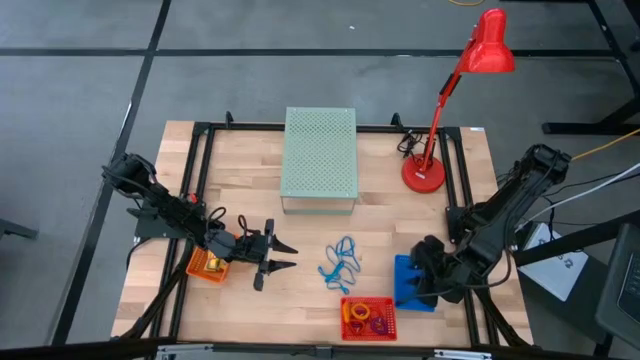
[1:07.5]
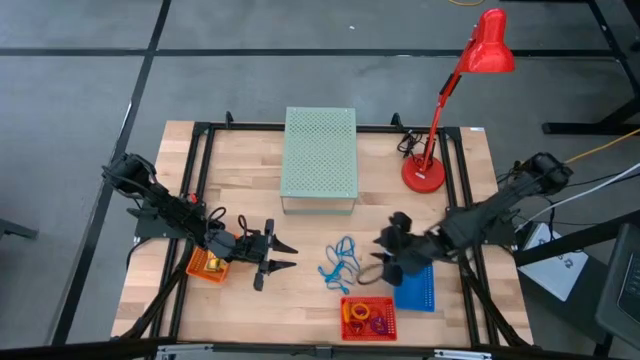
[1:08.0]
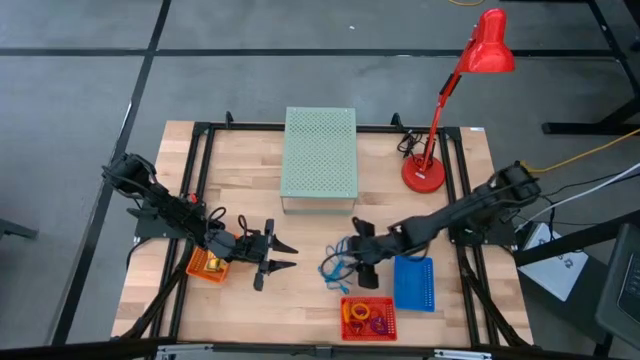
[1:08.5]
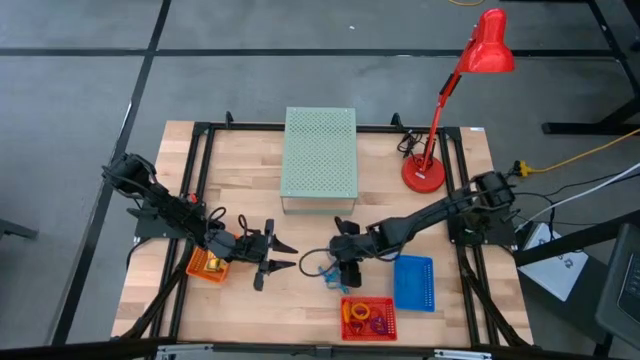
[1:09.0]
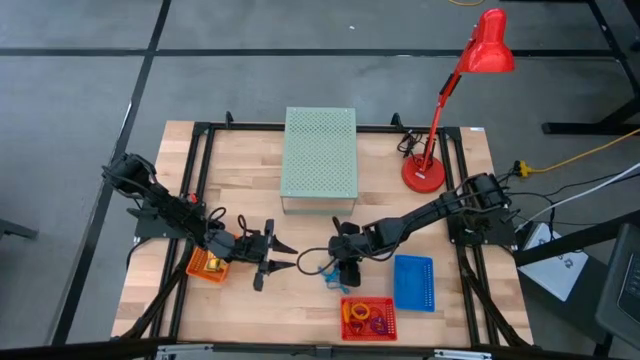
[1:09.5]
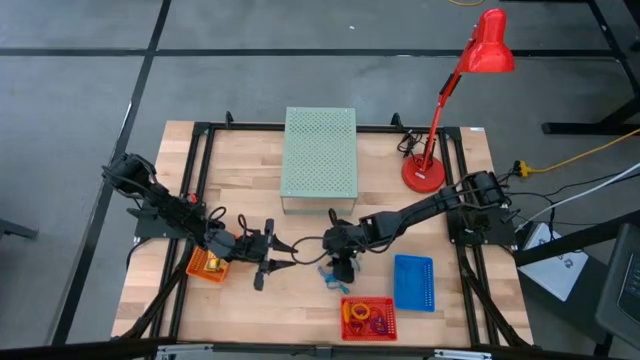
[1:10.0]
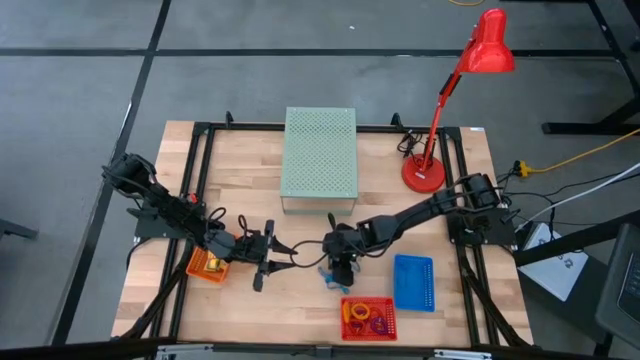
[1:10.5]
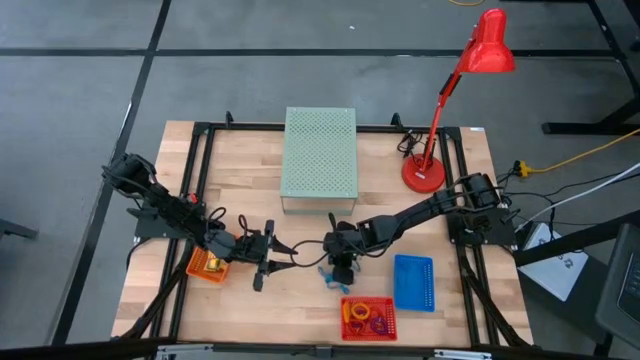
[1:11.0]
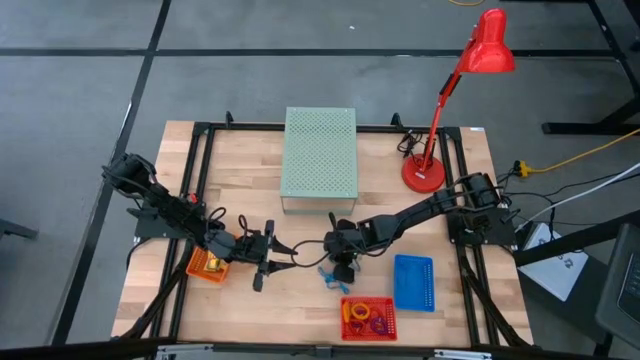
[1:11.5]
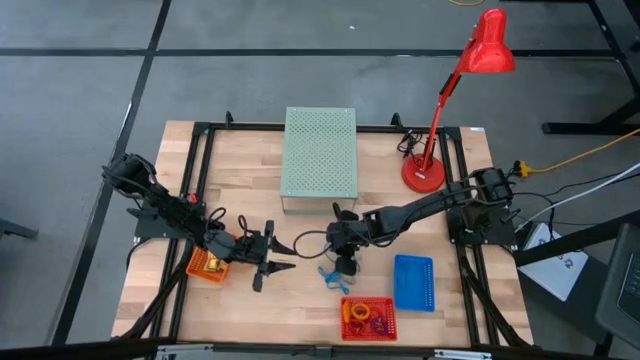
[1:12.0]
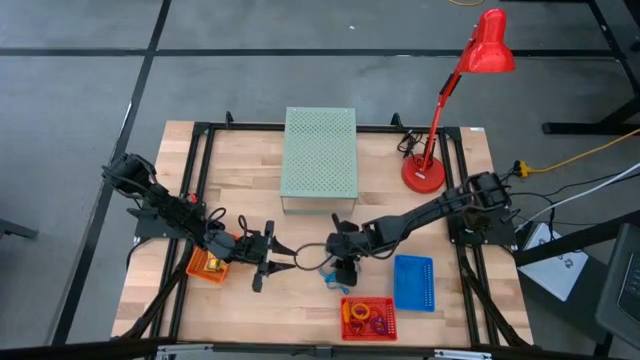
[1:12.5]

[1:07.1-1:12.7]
Task: Pick & Place Office Desk Supplies
Put the blue rubber band into the blue bin

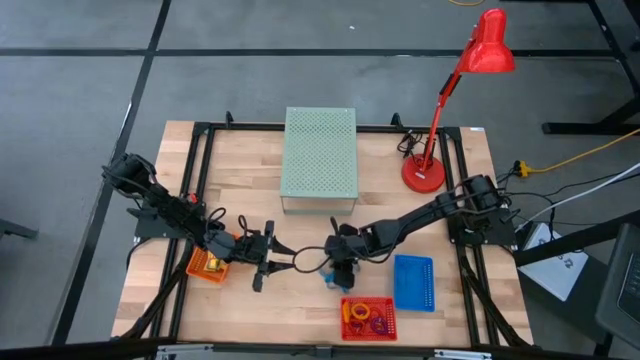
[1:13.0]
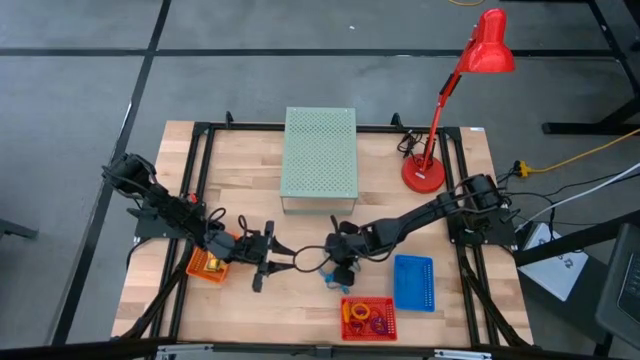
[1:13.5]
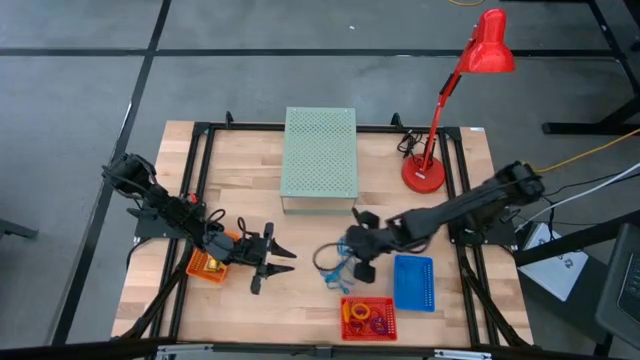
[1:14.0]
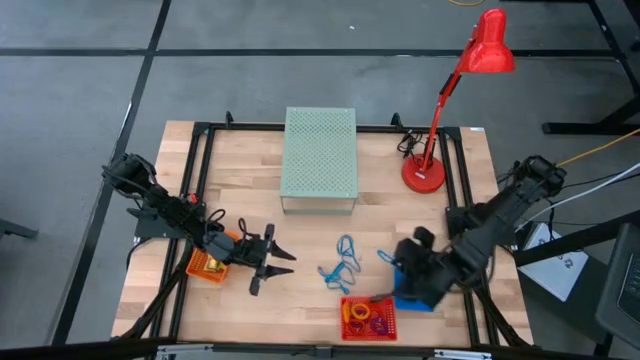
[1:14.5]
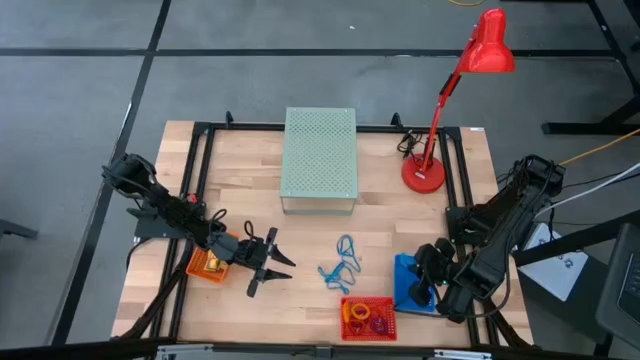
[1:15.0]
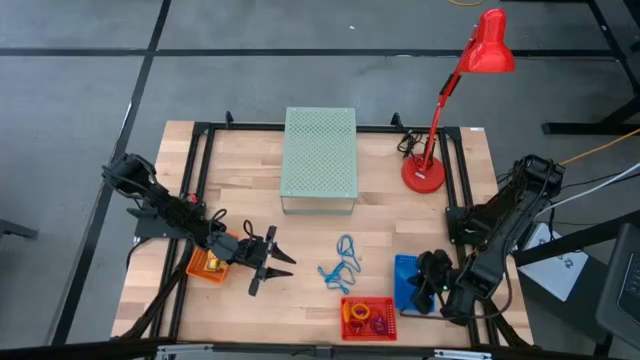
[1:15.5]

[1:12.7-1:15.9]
Put the blue rubber band into the blue bin

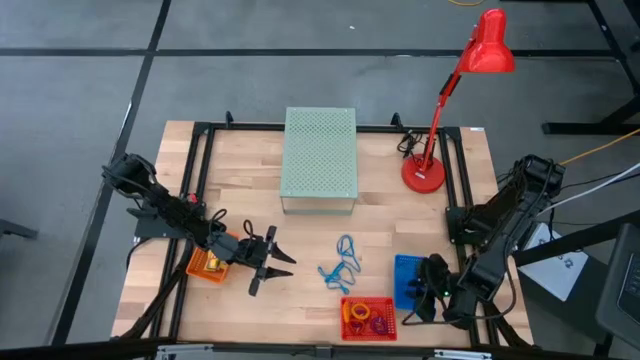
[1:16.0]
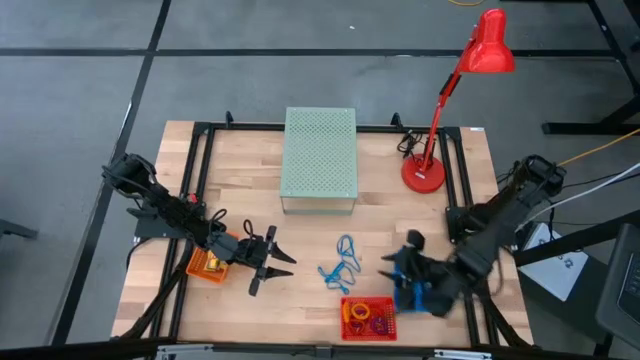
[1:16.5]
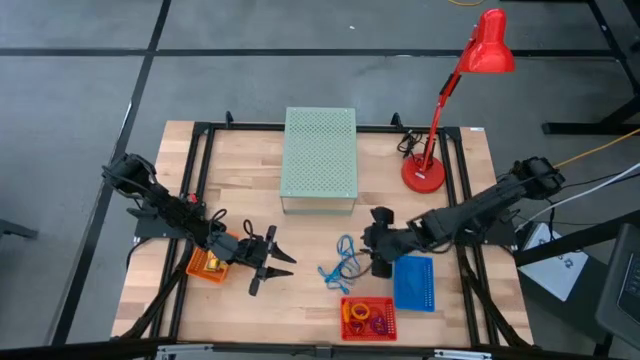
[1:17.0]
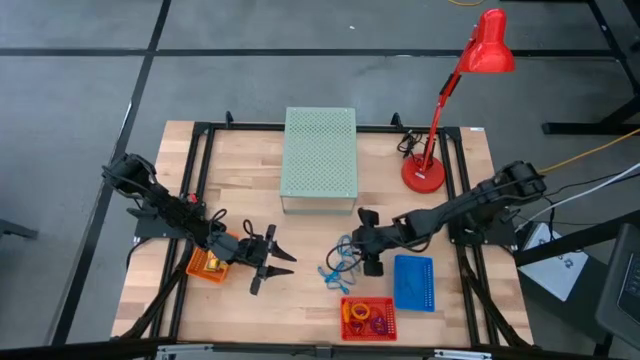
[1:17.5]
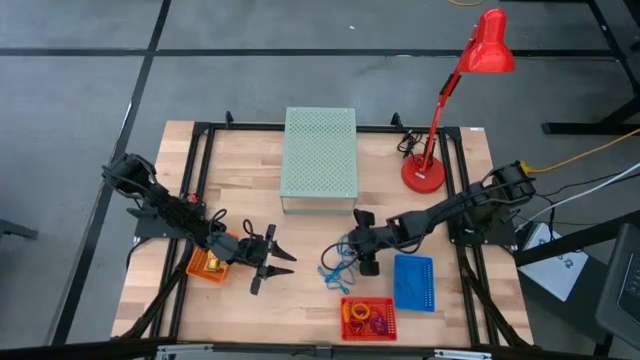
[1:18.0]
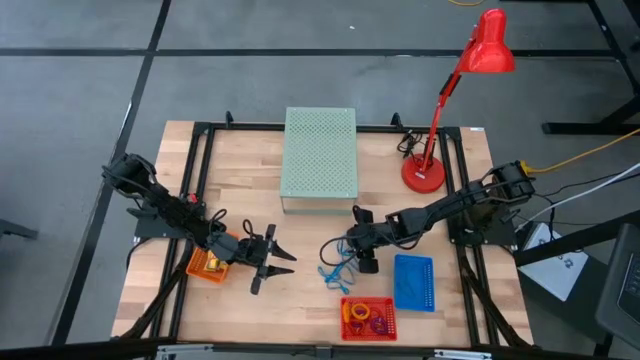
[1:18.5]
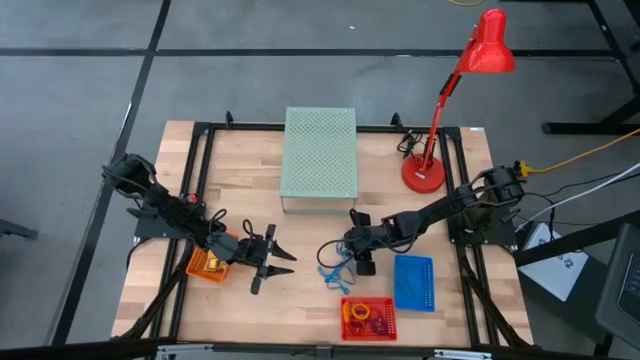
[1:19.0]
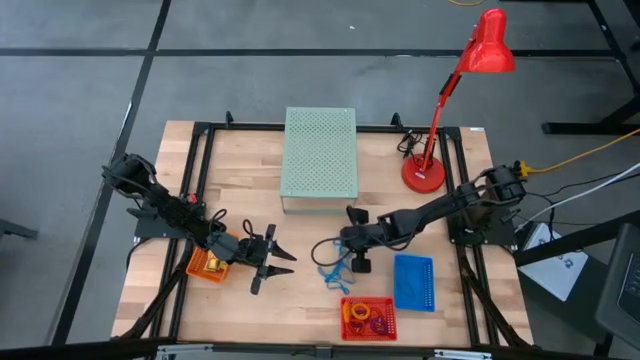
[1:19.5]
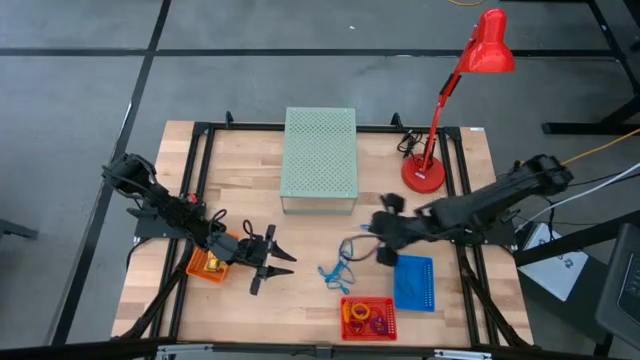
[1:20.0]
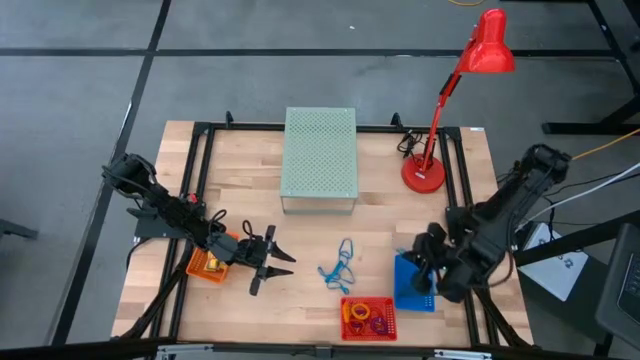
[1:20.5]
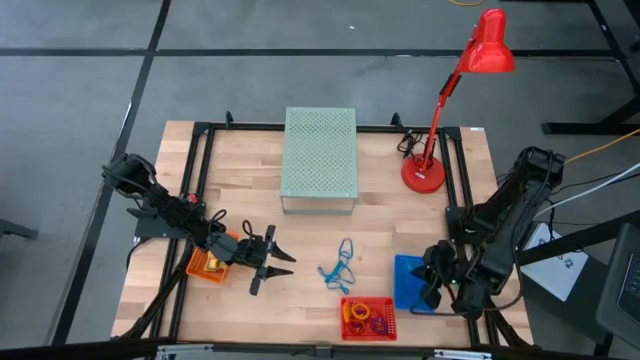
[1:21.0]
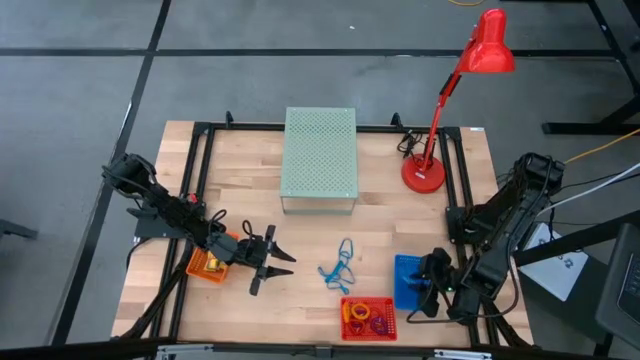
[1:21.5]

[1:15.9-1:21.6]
Put the blue rubber band into the blue bin

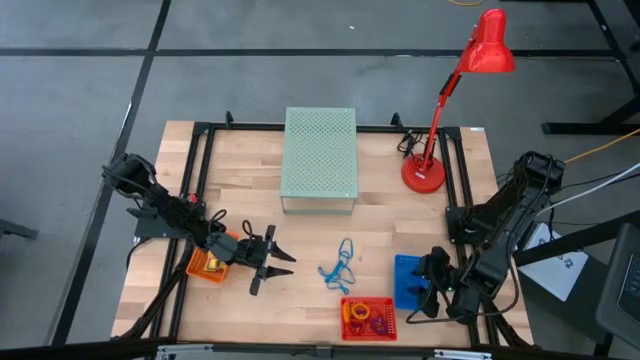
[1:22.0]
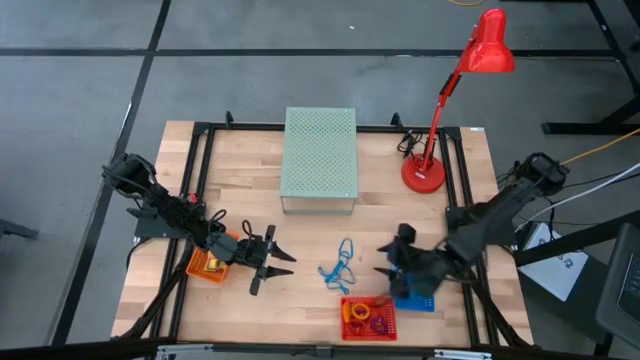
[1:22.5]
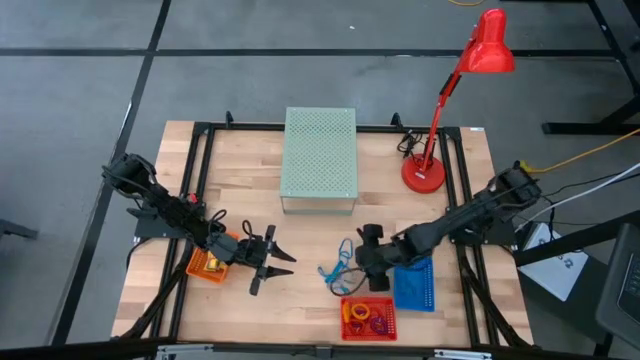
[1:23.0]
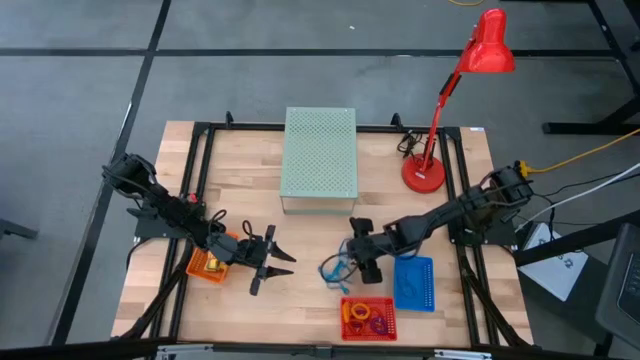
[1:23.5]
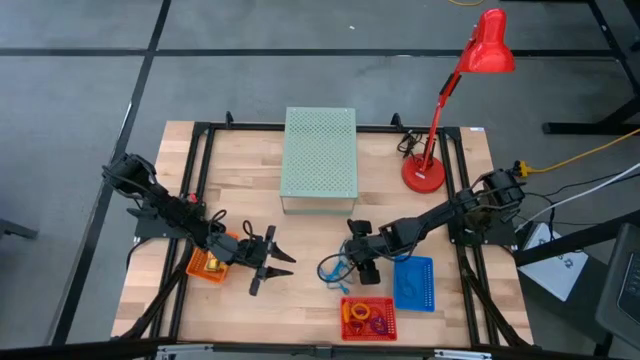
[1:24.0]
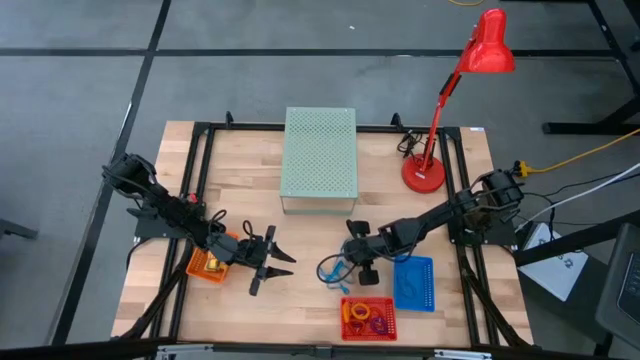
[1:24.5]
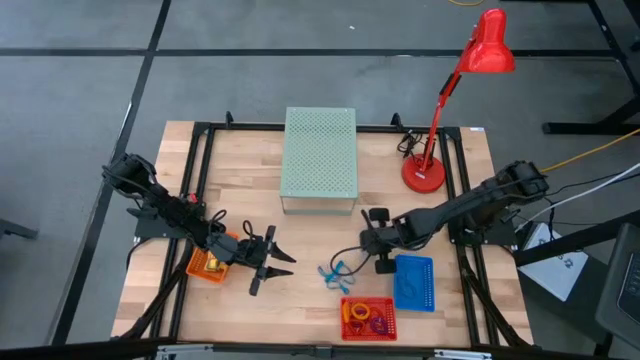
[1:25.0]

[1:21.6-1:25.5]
Put the blue rubber band into the blue bin

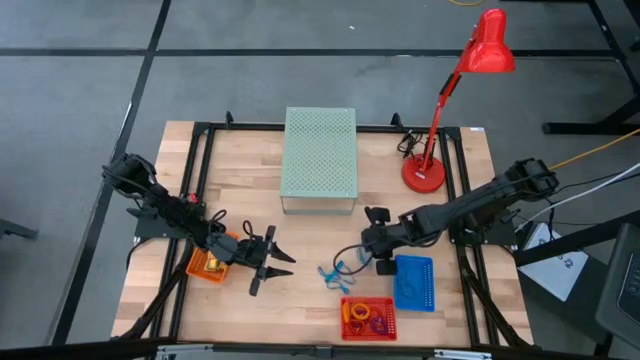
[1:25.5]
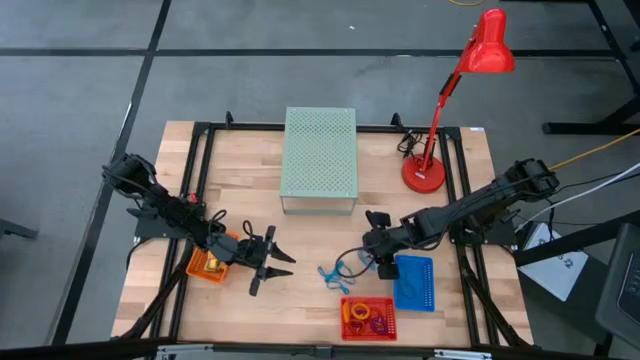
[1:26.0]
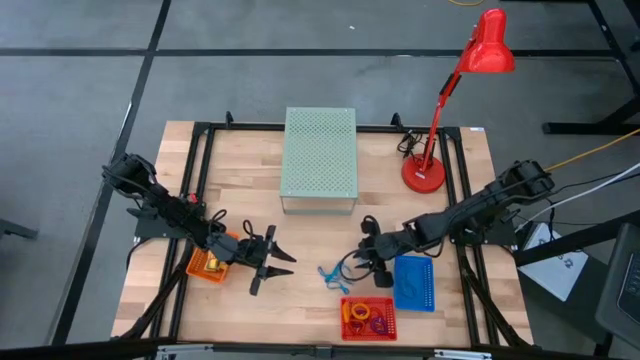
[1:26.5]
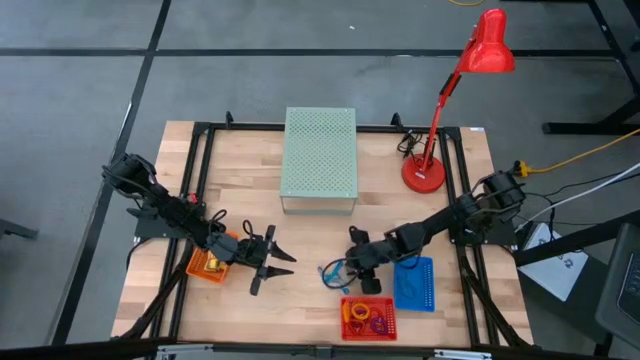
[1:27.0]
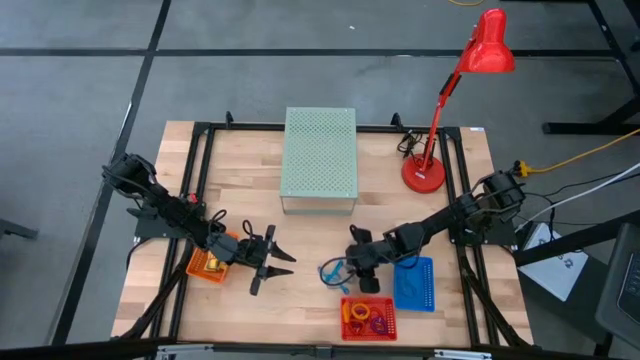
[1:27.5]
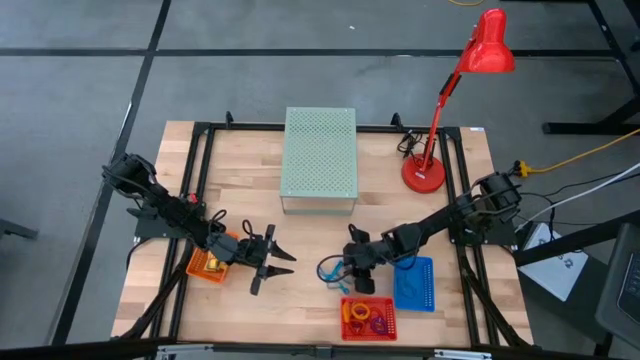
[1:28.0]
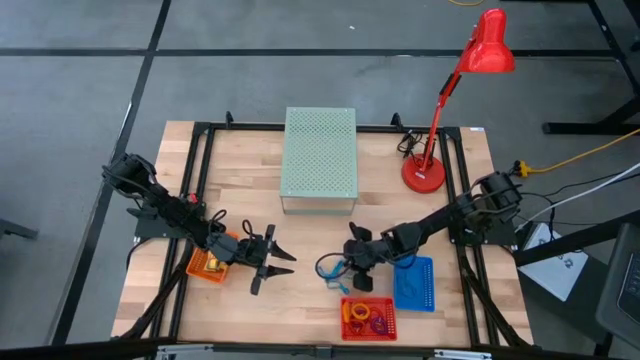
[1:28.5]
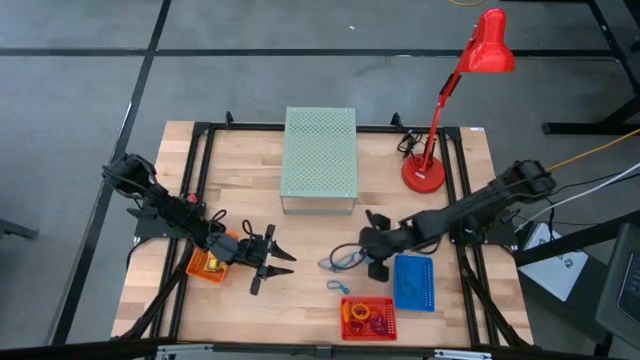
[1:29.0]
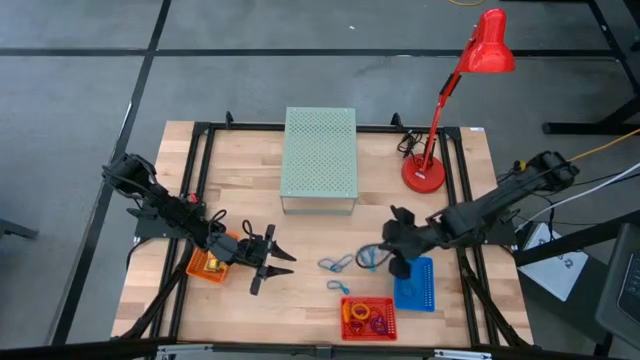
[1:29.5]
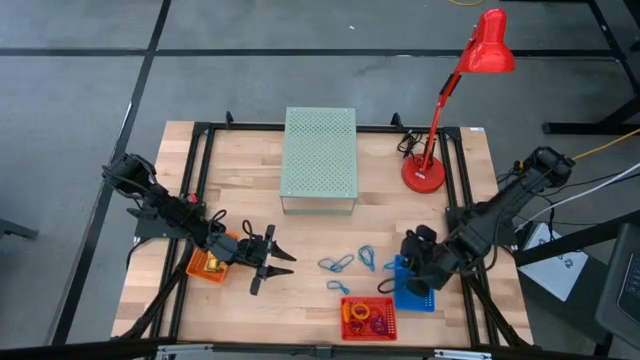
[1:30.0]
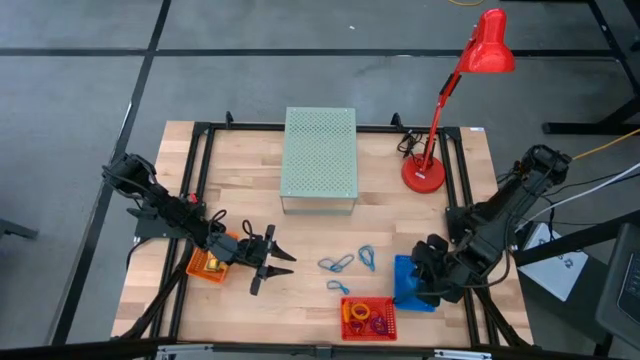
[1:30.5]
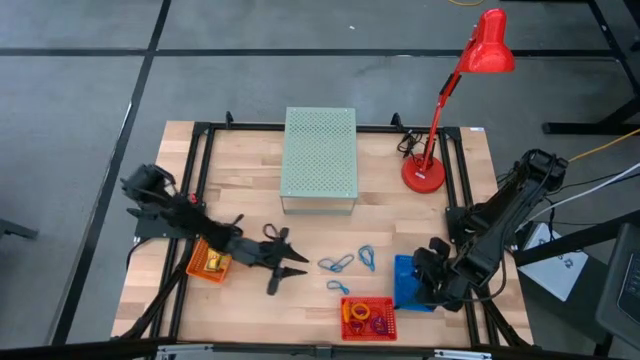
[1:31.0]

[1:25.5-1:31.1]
Put the blue rubber band into the blue bin
